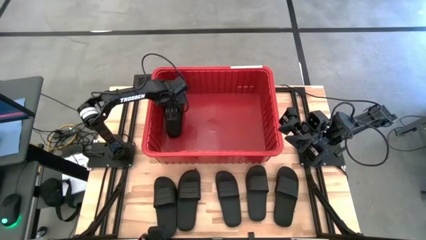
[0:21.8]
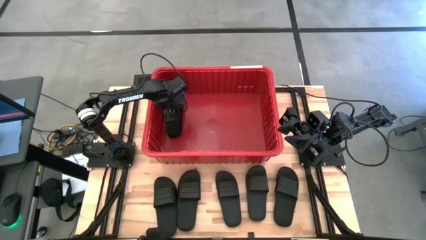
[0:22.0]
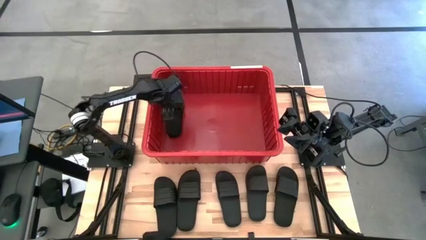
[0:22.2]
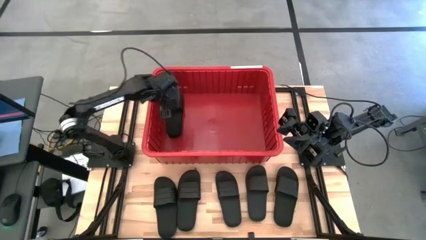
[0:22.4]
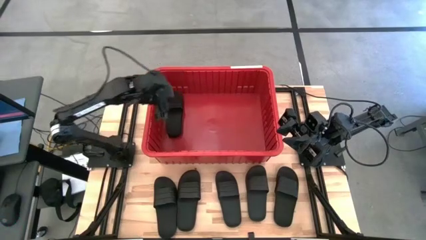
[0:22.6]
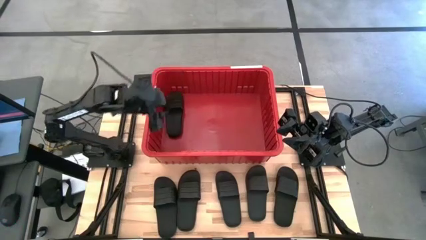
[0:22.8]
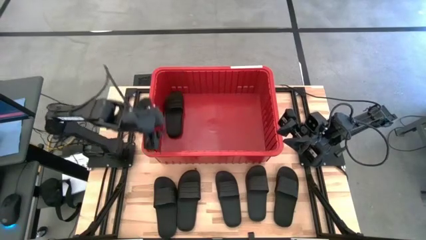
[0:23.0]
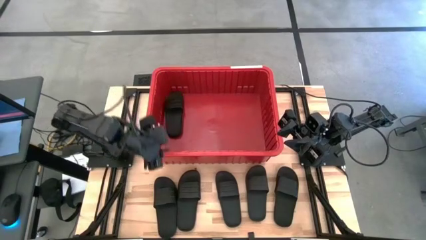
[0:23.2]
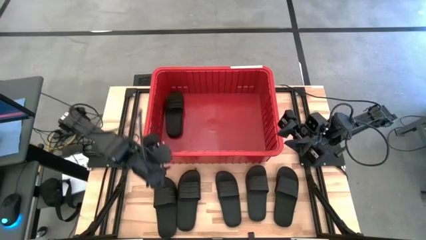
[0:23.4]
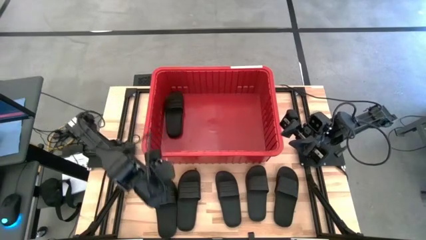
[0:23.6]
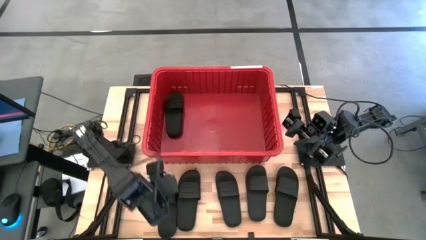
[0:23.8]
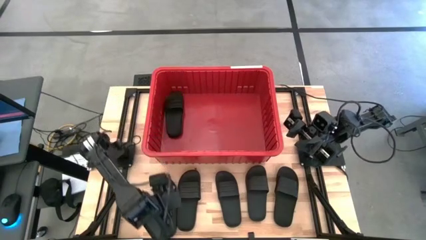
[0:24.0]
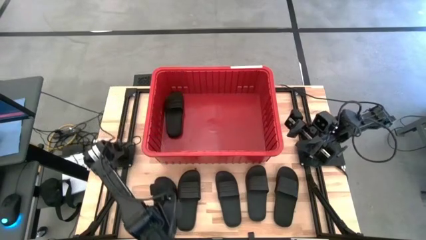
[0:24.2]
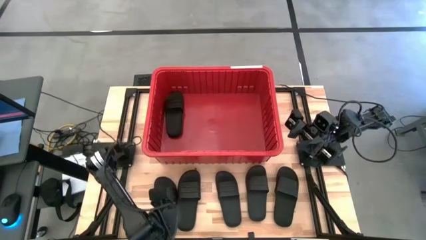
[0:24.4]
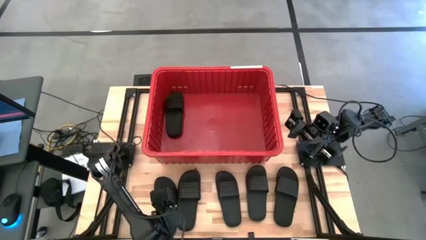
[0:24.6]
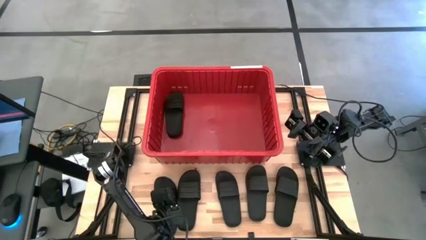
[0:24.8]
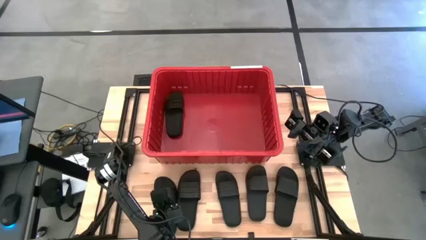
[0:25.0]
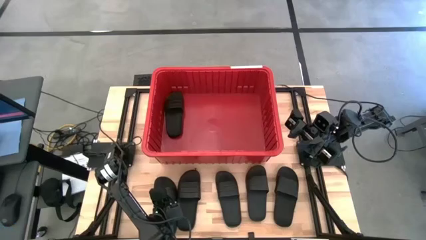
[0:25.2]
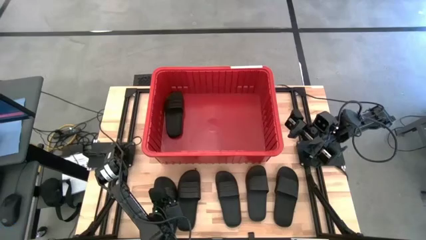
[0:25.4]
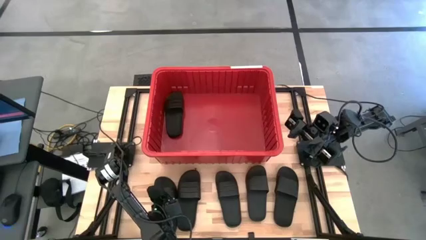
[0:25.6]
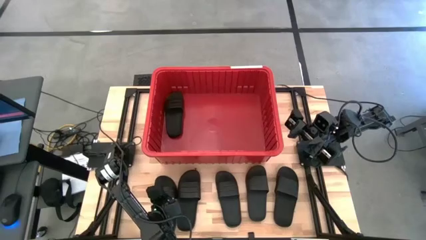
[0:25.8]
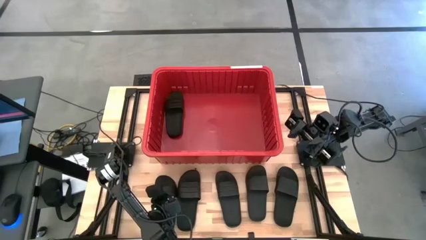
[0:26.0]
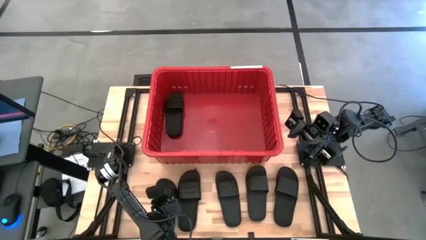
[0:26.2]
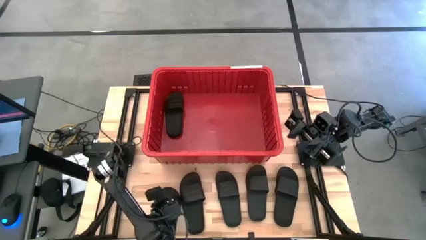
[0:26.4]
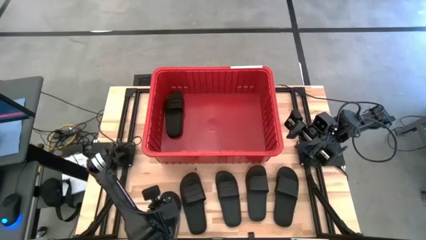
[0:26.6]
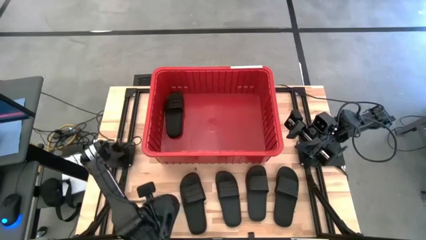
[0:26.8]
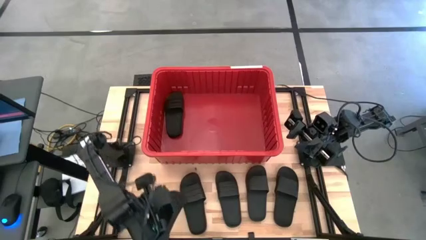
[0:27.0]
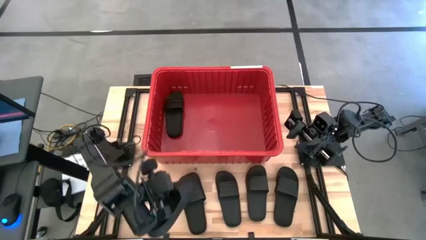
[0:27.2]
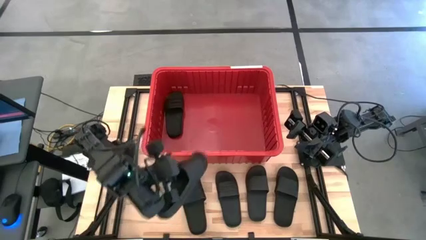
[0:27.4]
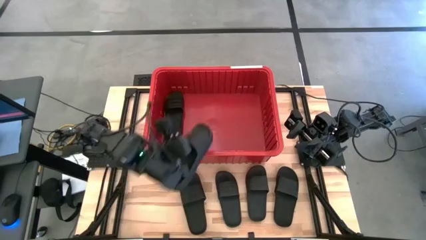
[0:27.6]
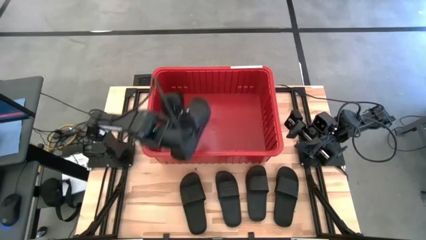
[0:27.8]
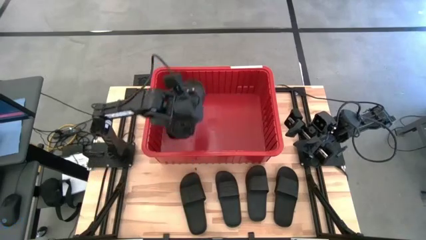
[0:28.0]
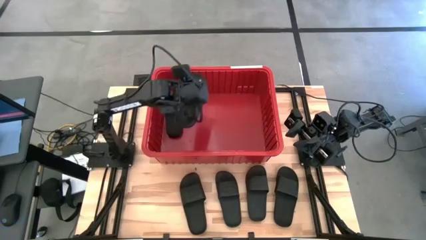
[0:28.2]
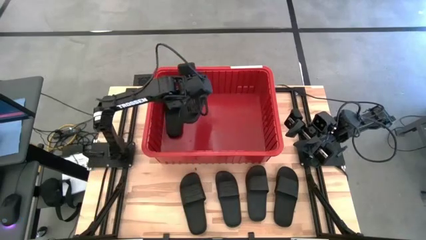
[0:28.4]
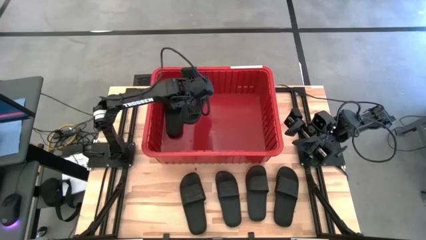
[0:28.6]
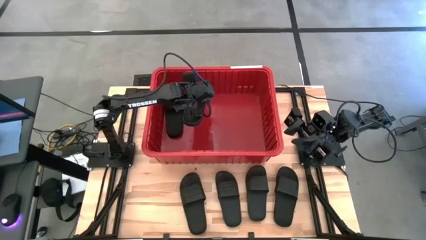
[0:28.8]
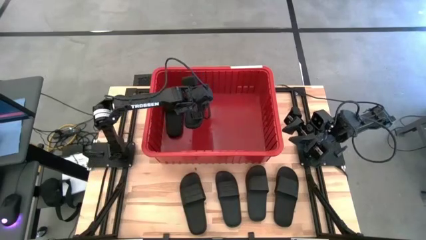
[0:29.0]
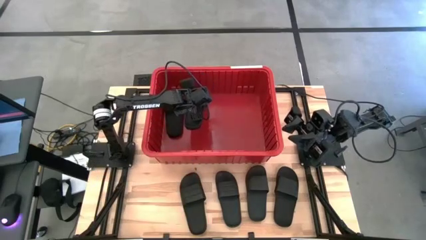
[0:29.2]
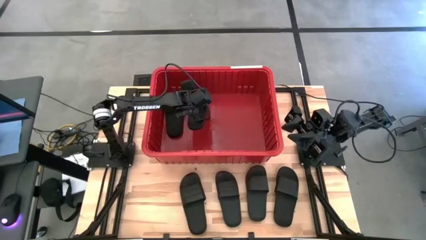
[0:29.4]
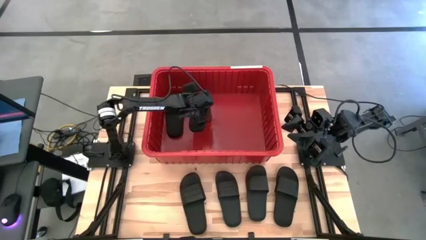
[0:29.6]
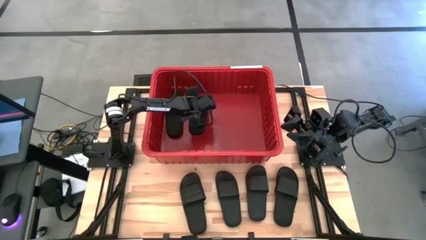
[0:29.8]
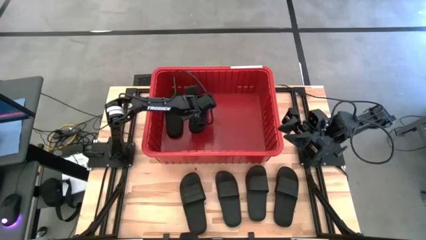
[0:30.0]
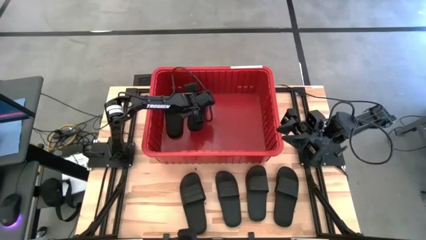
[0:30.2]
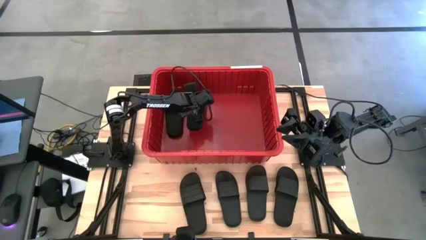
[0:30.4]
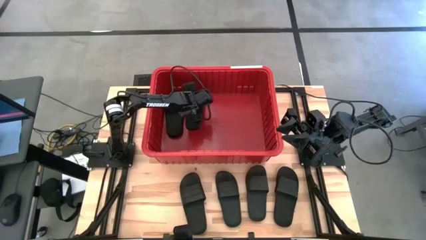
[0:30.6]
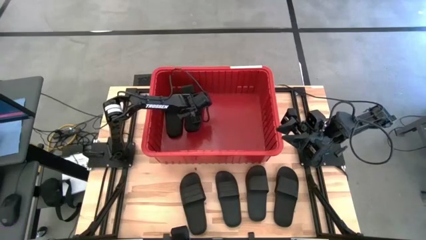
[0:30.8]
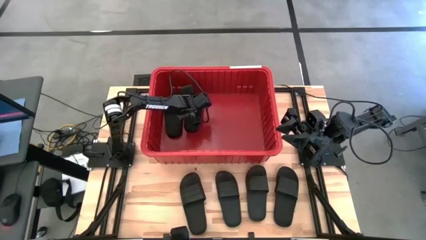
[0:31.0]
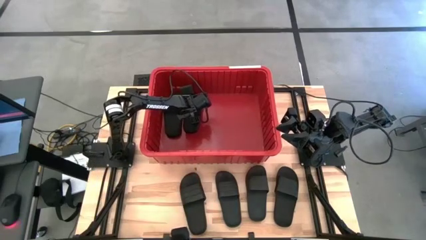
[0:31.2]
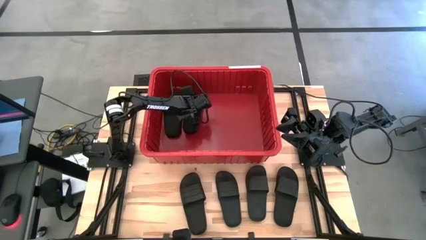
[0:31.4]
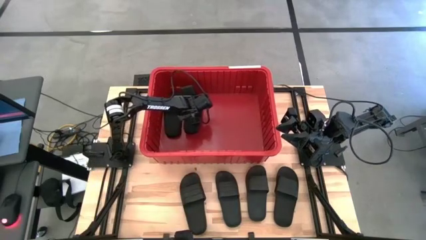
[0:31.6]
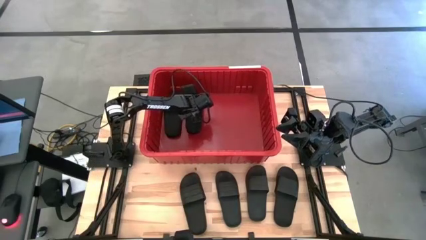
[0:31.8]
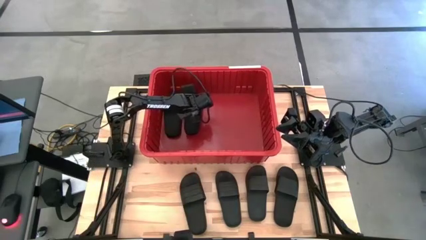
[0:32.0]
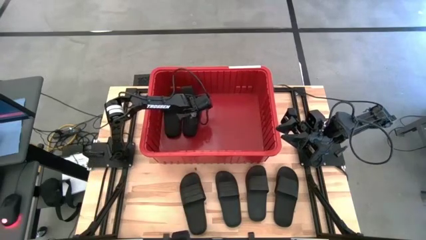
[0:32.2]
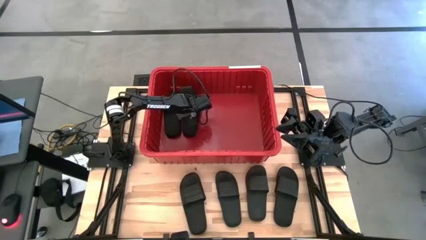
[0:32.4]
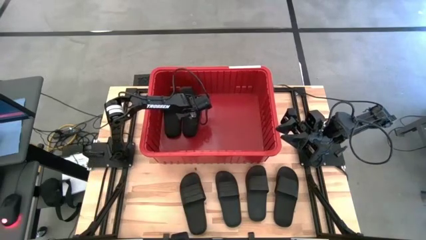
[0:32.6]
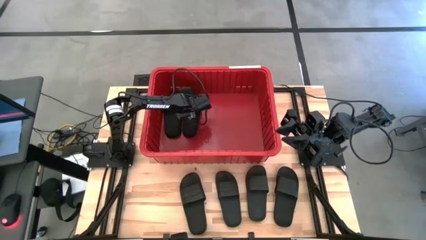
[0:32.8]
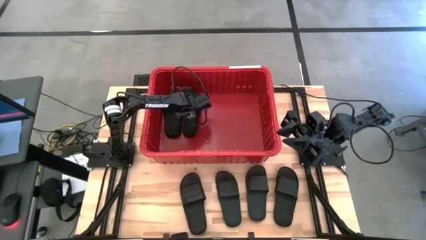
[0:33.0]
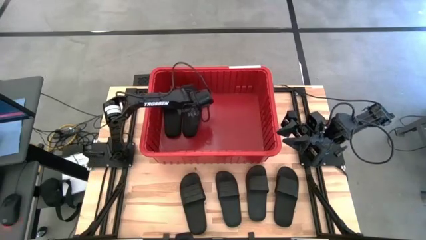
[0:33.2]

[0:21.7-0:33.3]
Task: Pick and place slides into bin
Put the black slides into the red bin
